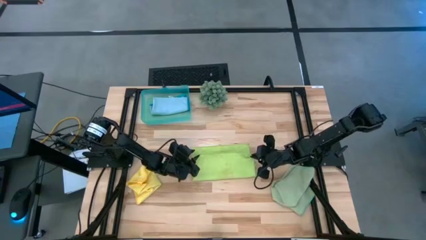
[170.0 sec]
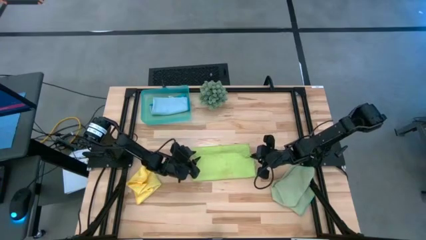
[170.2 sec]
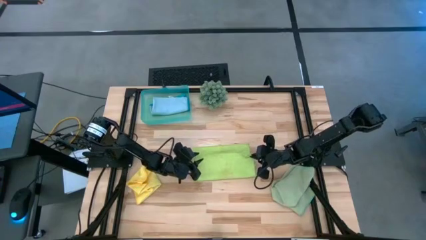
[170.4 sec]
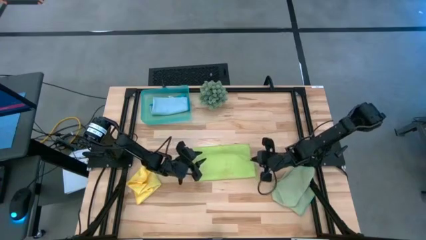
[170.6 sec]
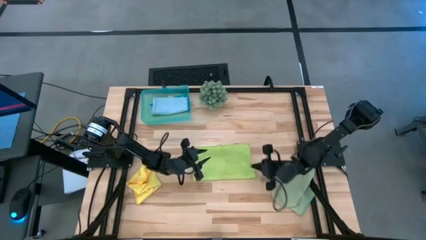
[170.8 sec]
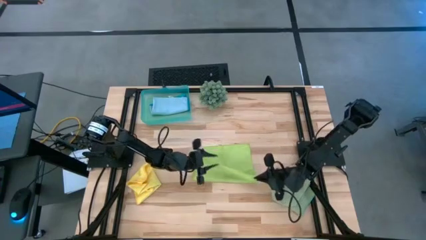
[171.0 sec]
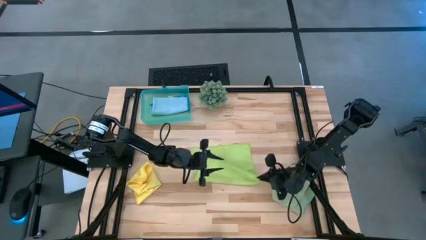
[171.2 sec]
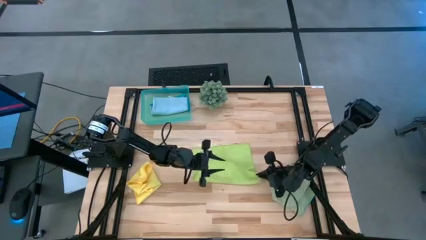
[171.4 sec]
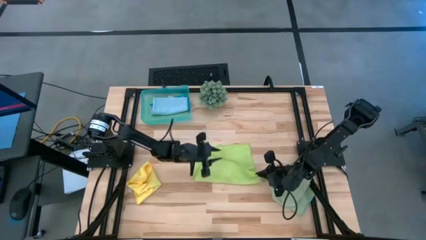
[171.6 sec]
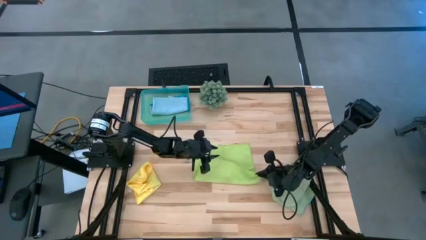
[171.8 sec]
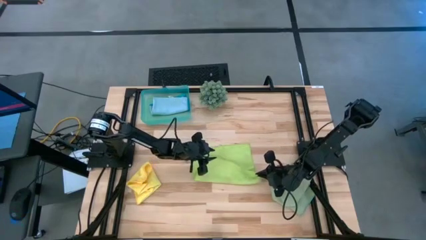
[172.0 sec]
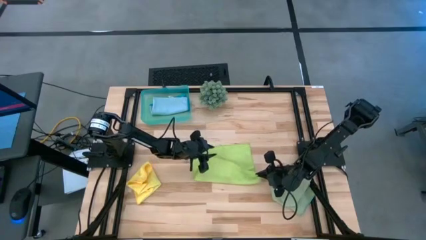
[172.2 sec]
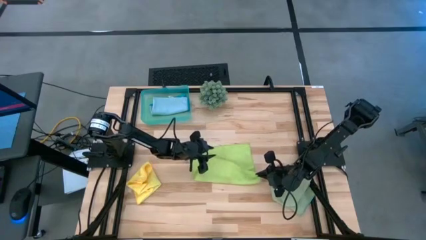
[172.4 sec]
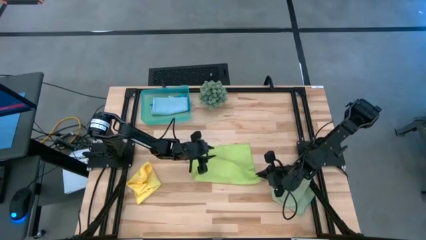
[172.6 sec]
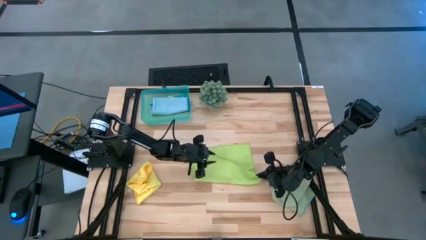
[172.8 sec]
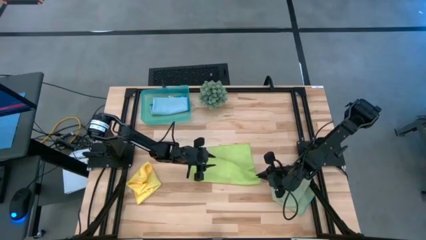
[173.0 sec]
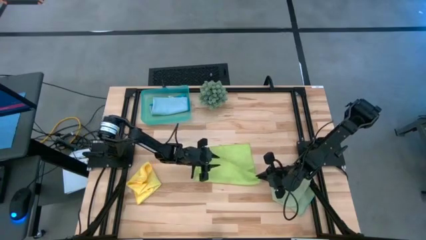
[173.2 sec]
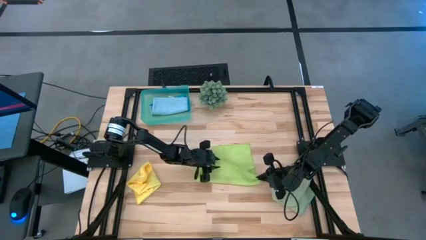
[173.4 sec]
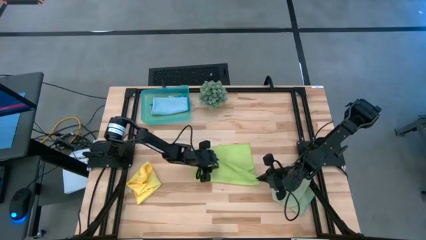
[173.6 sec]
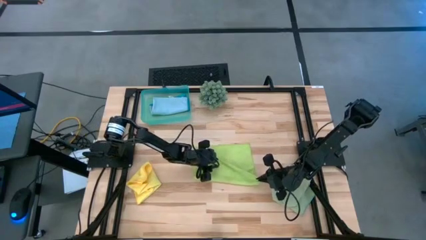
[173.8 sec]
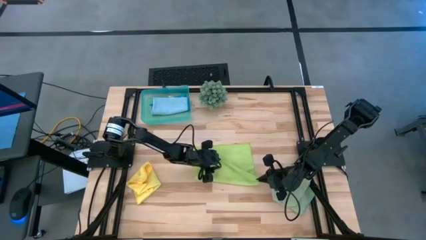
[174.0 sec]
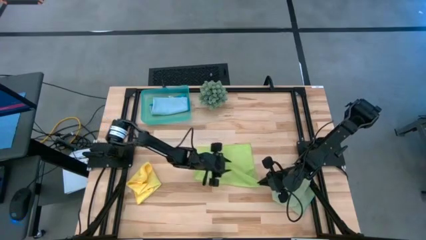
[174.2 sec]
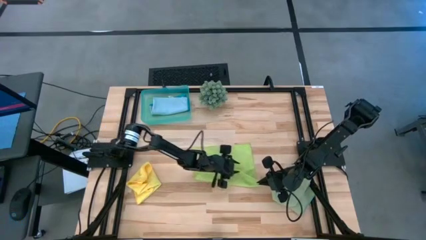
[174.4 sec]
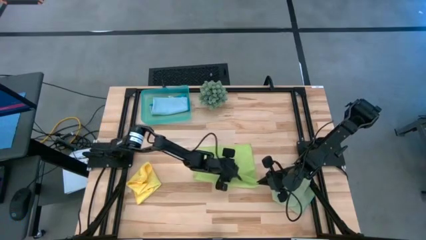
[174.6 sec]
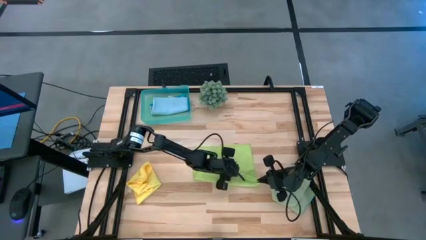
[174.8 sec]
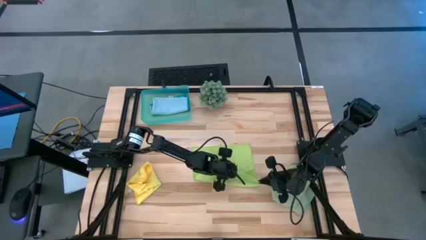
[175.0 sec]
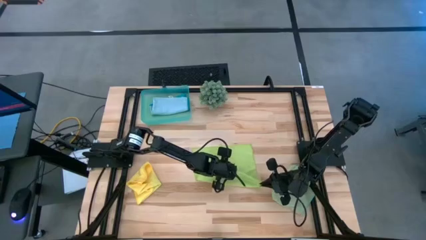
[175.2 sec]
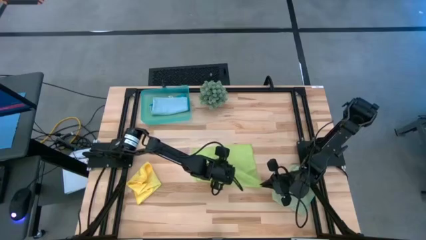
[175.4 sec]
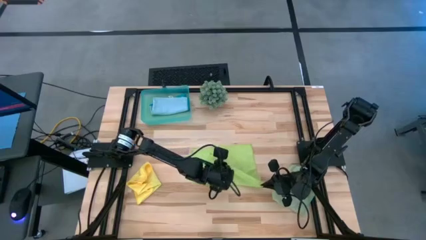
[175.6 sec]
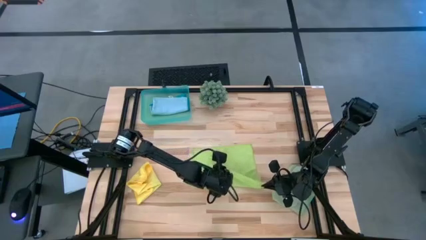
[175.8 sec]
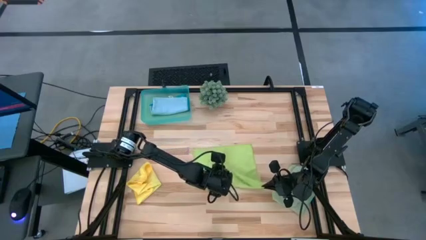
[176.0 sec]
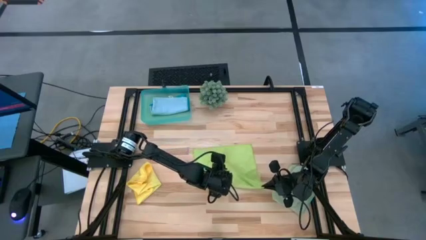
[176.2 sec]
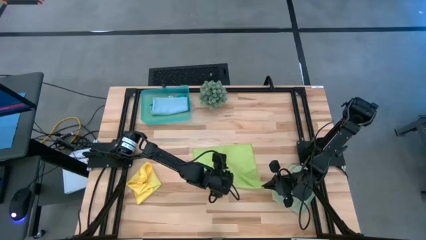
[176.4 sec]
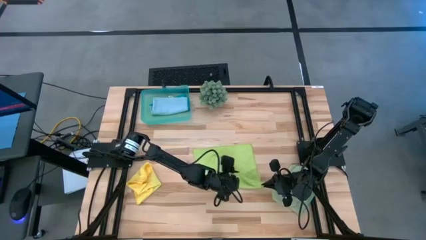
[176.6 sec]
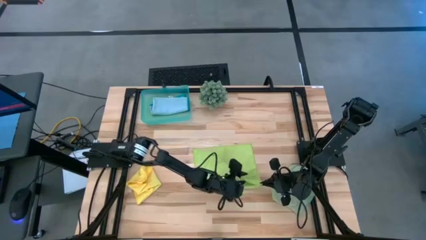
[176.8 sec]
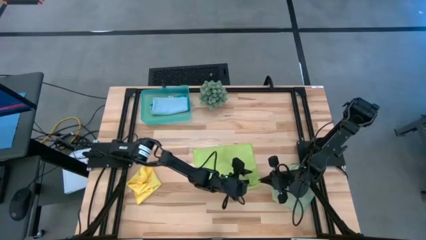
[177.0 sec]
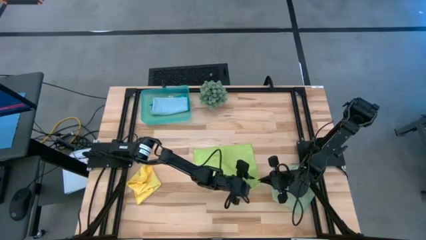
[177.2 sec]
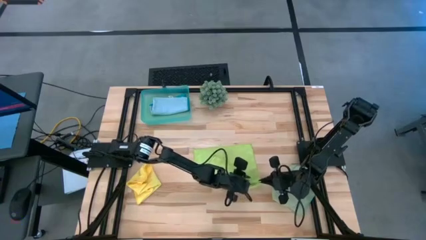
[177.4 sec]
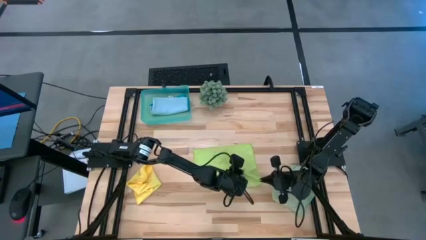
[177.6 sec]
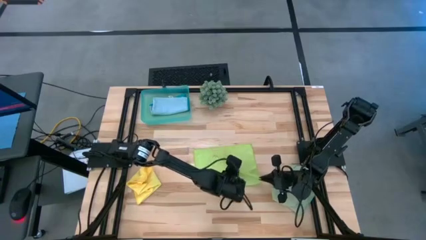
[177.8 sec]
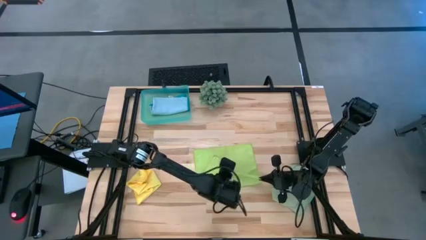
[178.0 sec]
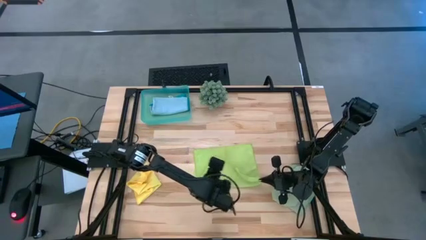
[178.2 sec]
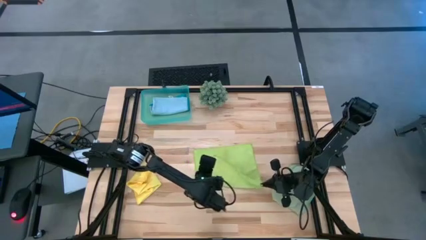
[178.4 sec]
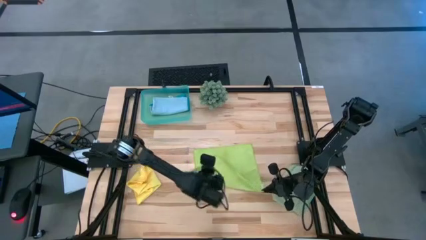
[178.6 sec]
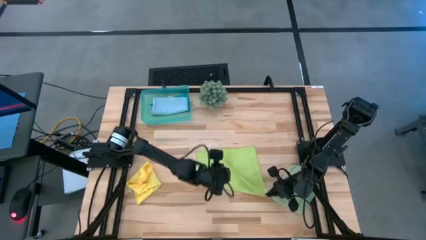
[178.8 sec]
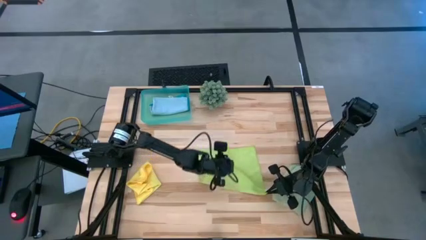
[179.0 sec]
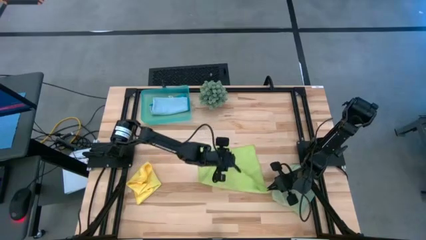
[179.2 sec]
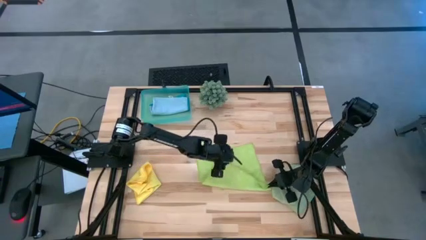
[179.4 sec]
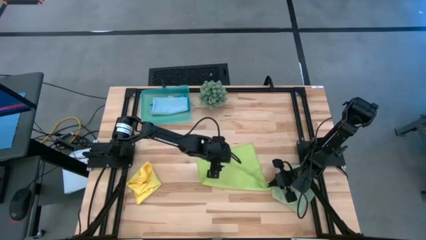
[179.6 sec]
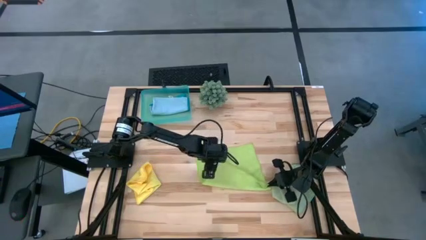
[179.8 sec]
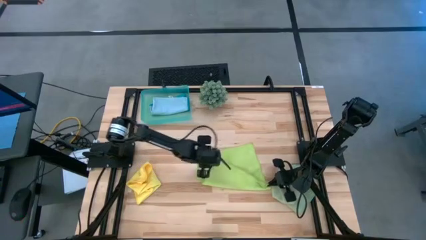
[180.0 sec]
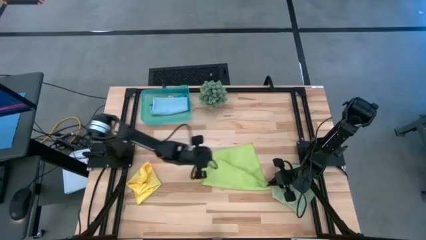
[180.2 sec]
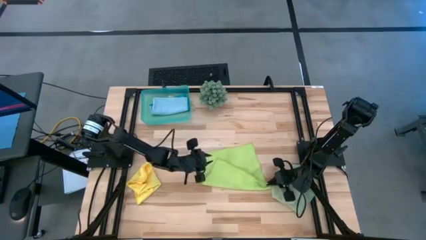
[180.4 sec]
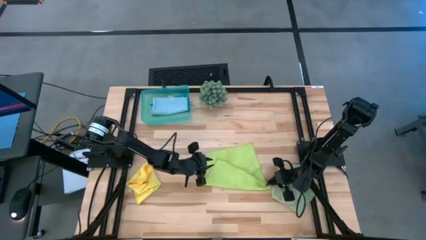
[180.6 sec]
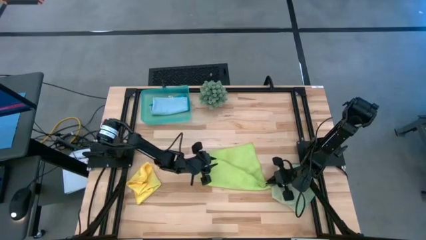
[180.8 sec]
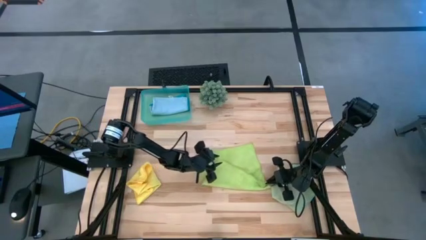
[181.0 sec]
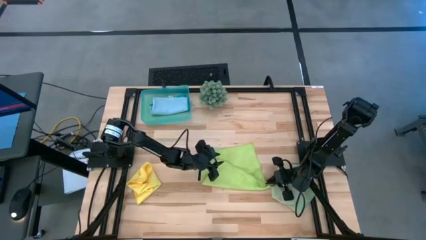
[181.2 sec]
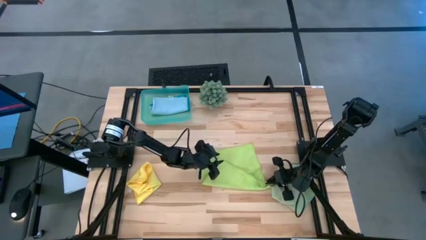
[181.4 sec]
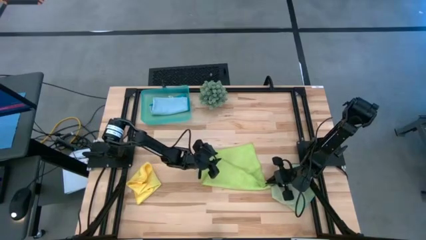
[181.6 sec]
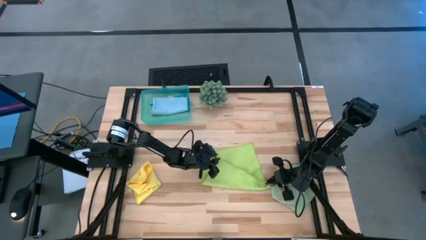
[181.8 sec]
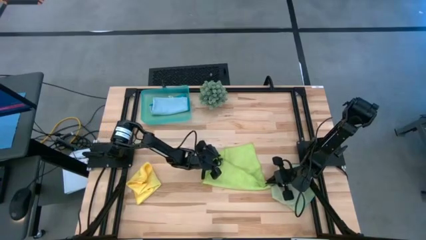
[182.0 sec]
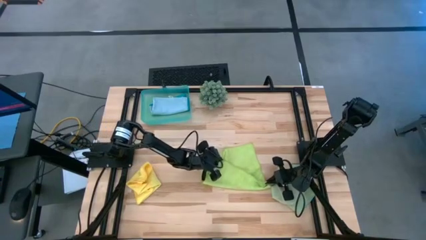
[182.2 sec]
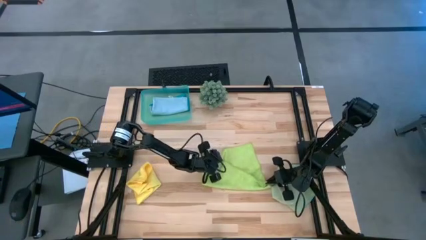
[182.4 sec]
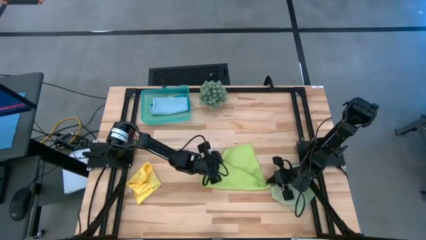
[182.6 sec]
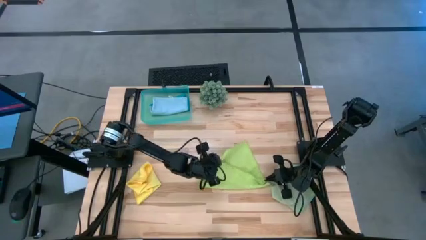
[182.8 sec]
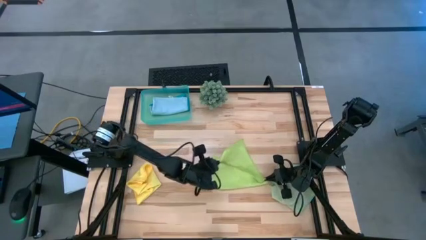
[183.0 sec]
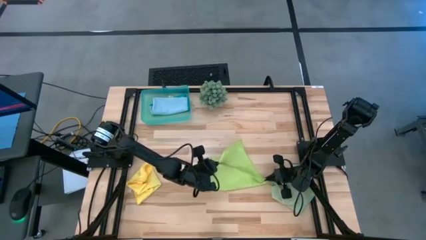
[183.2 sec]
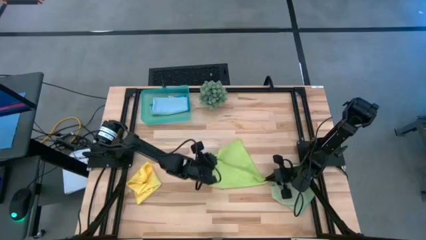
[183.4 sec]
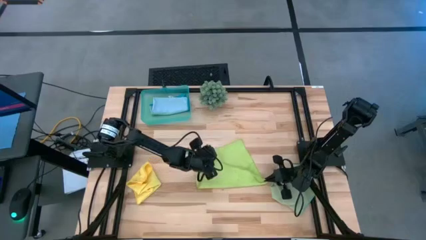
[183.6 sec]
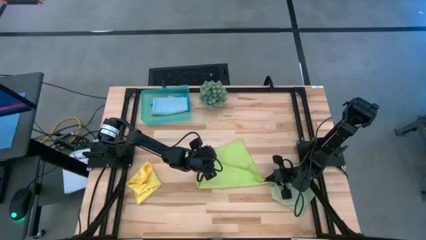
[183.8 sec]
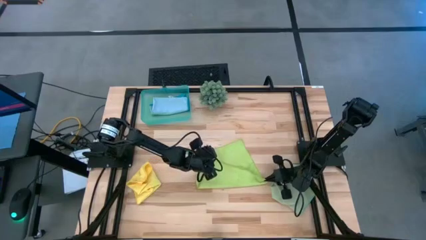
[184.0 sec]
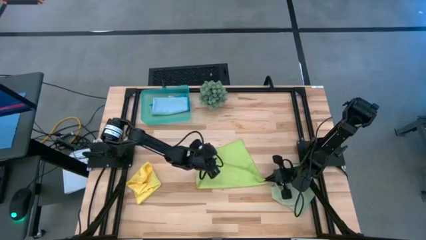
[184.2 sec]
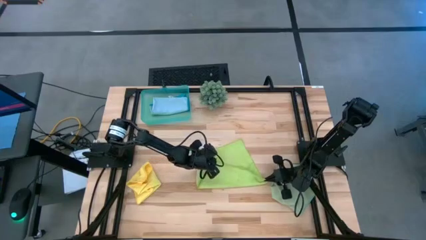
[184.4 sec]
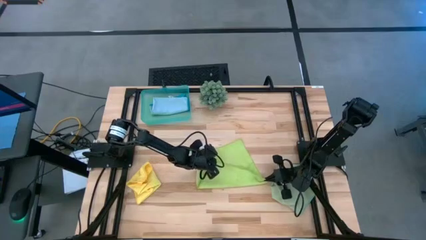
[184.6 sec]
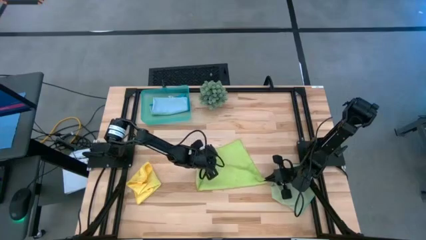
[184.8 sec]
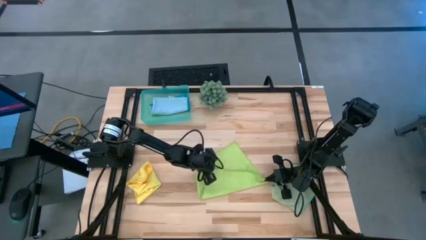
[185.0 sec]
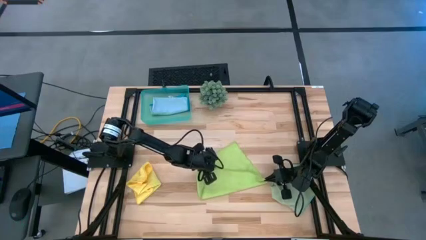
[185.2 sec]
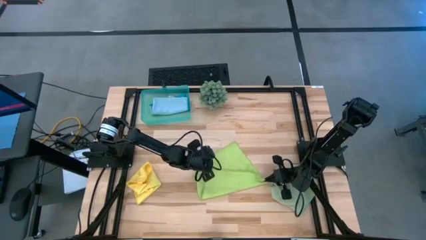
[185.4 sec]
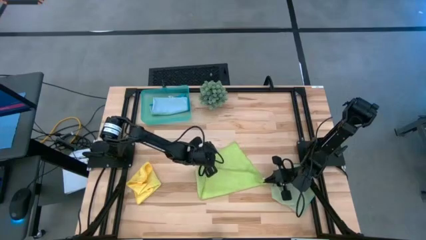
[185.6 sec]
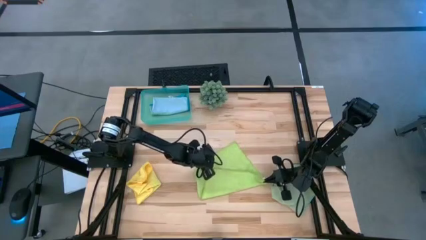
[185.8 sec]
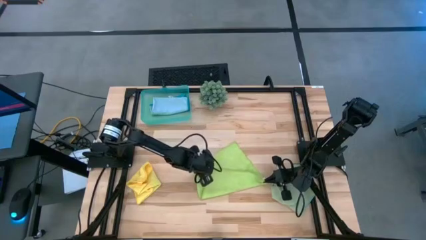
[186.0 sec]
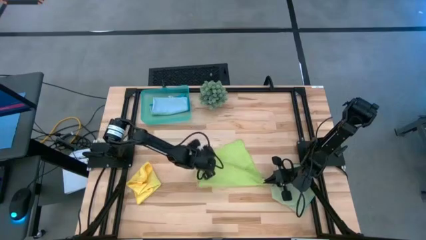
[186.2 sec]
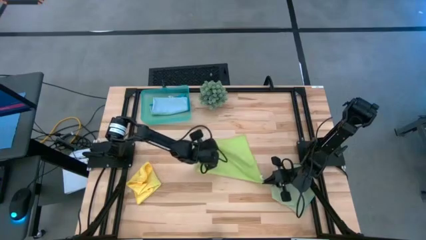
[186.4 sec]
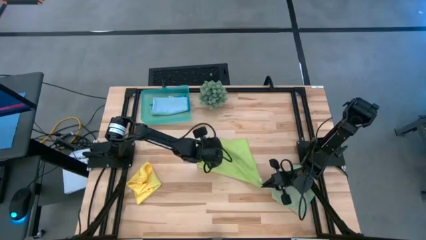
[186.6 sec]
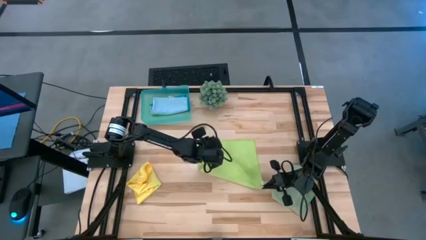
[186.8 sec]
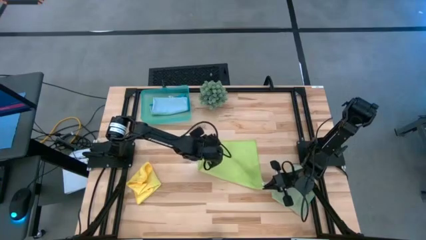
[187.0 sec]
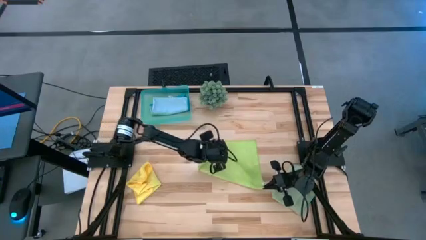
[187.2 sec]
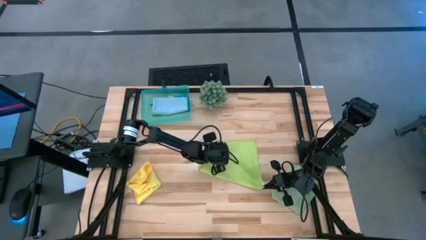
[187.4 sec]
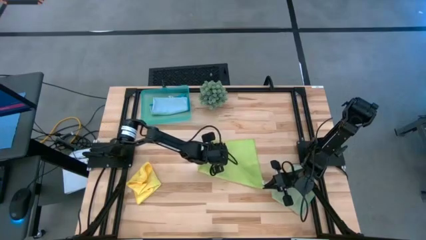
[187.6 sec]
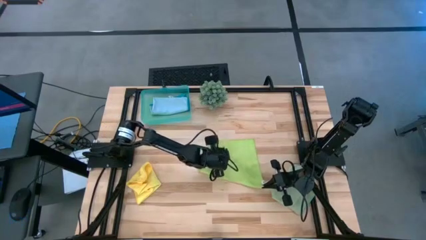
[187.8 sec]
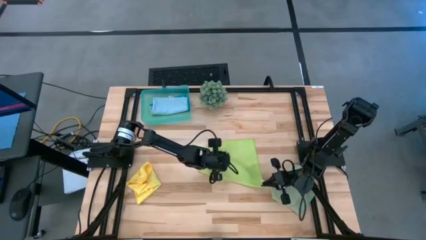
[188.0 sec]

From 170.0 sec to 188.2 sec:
Task: Fold microfiber towels
Fold the light green microfiber cloth
